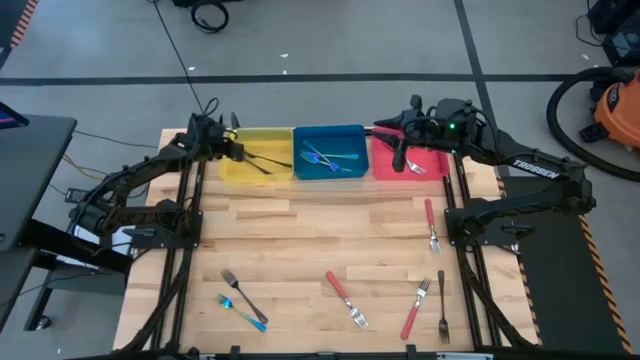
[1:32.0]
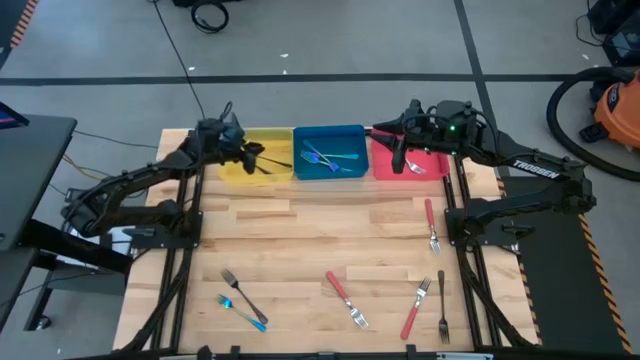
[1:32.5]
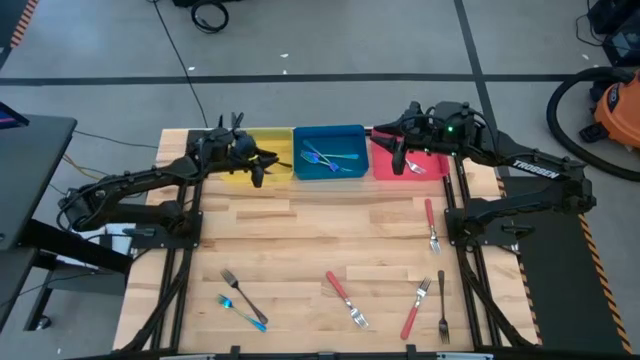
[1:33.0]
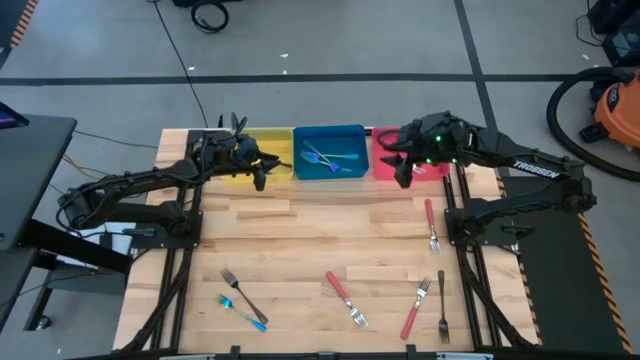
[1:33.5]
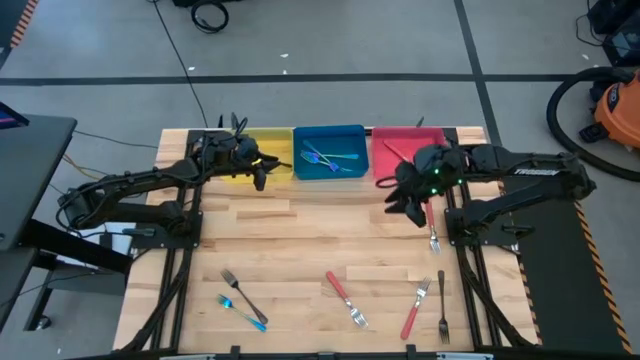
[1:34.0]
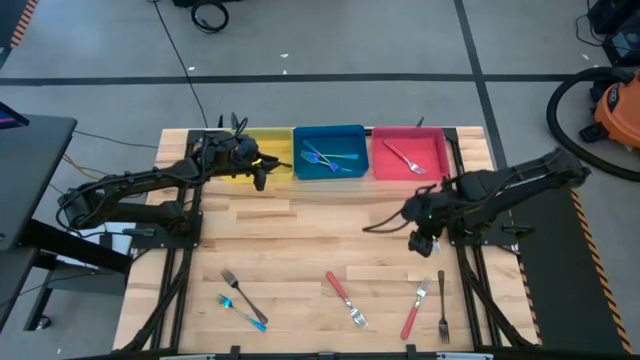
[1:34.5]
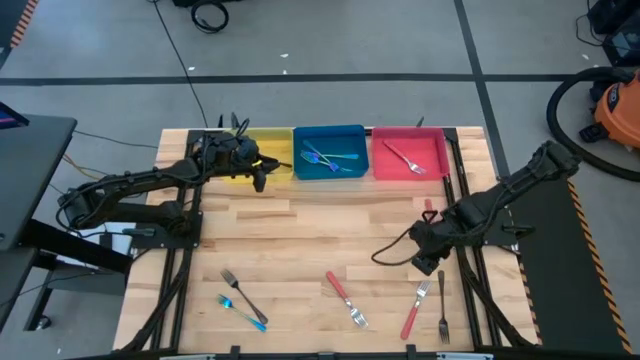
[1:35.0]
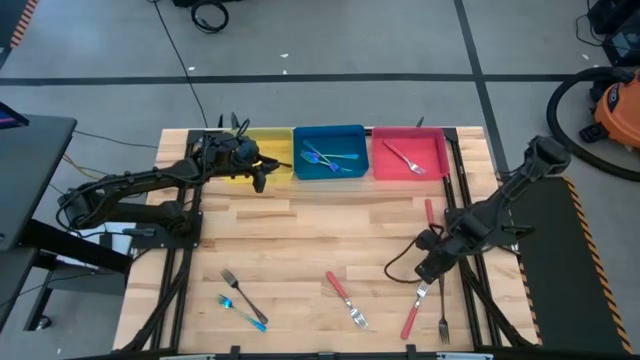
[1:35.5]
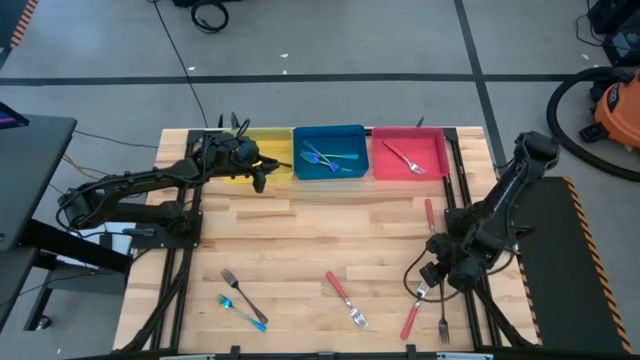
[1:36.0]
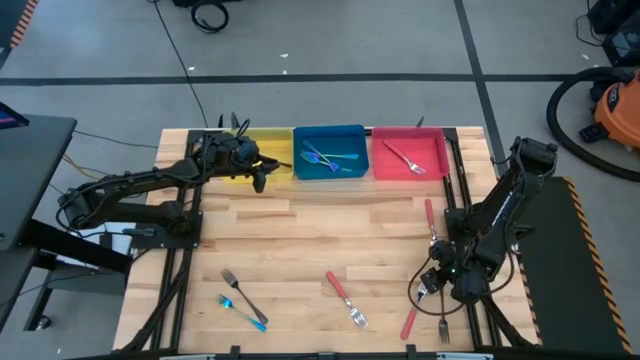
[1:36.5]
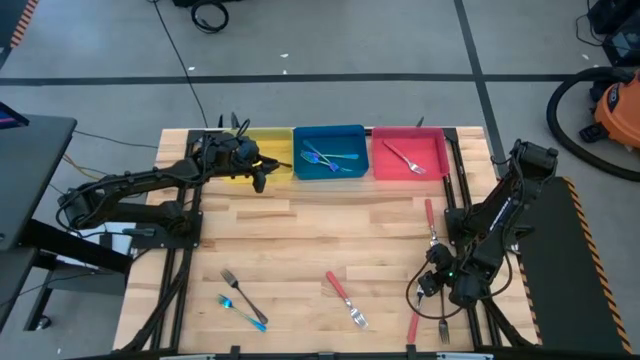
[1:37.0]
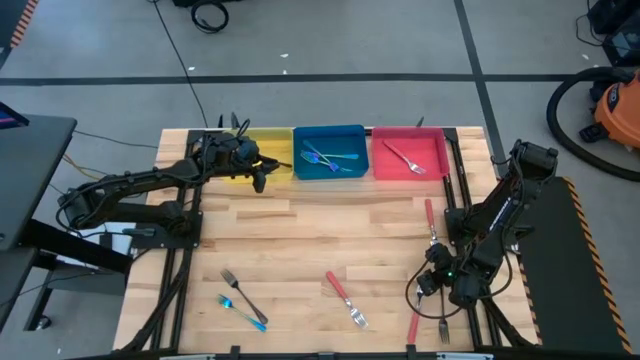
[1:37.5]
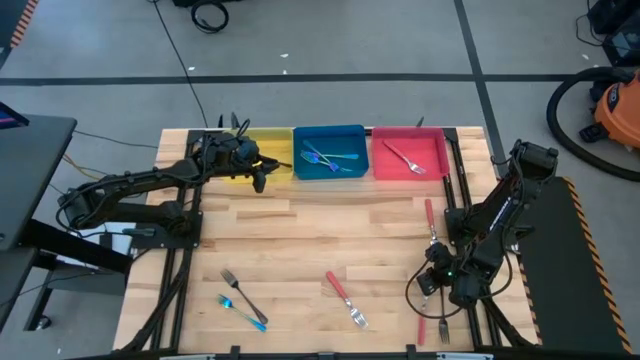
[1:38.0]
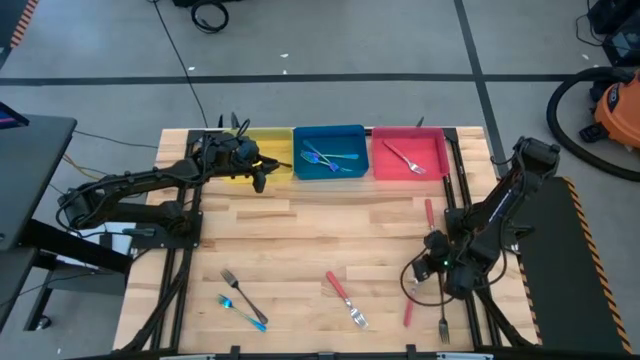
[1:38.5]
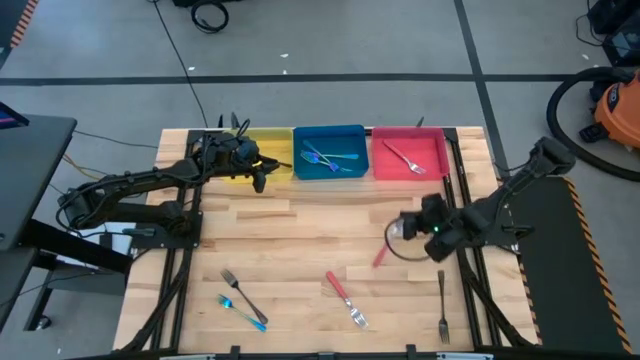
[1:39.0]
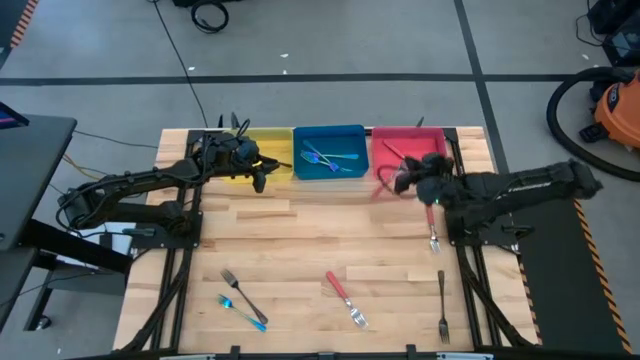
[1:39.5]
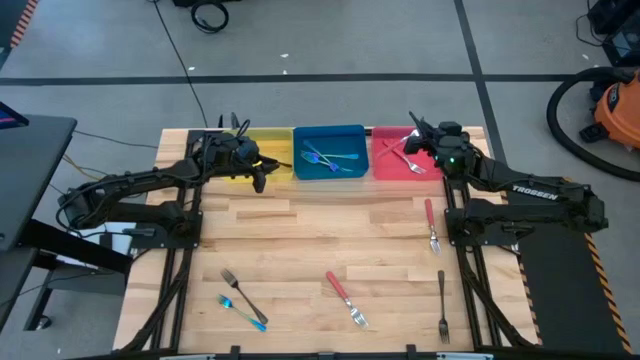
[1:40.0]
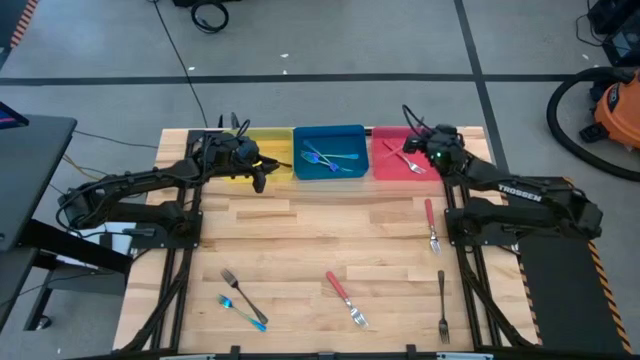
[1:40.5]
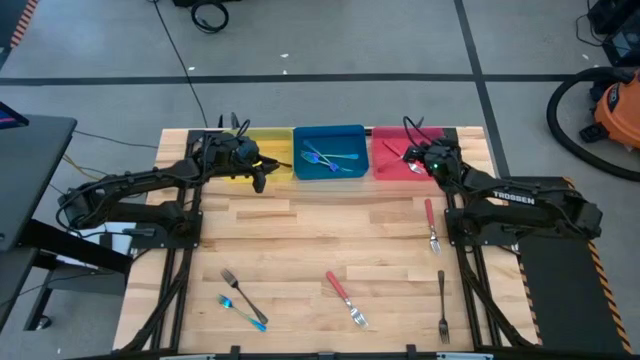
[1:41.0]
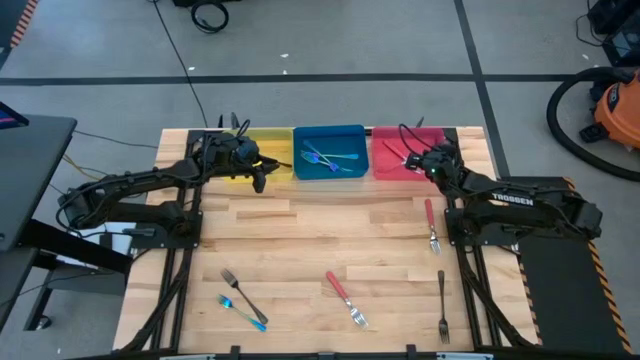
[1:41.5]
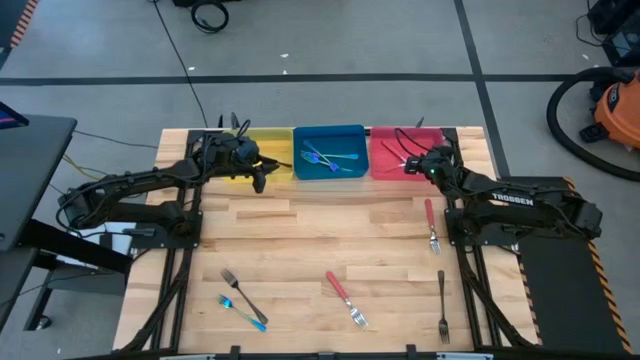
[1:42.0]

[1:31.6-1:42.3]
Task: Sort silverware by color (type)
Put the bottom right pink fork into the red bin

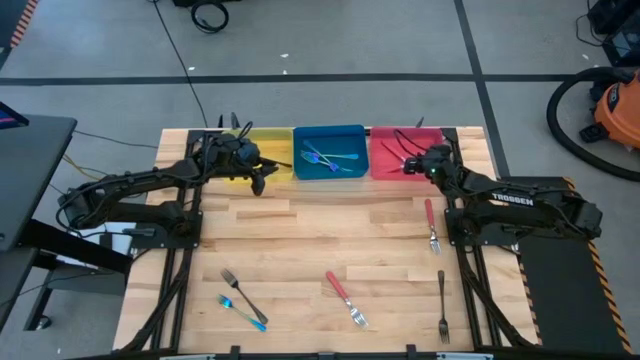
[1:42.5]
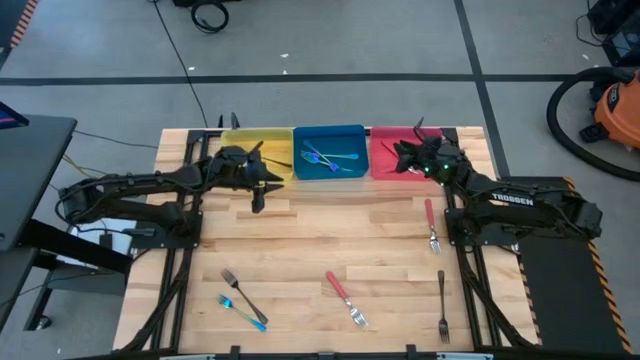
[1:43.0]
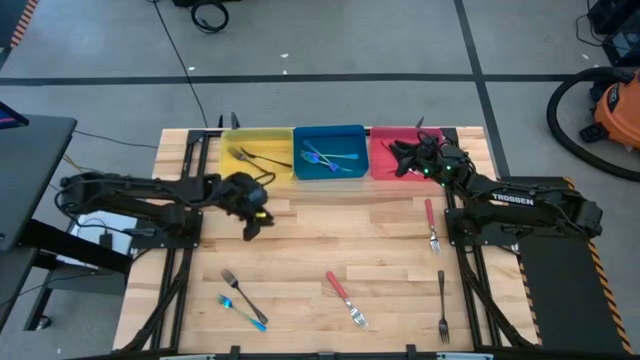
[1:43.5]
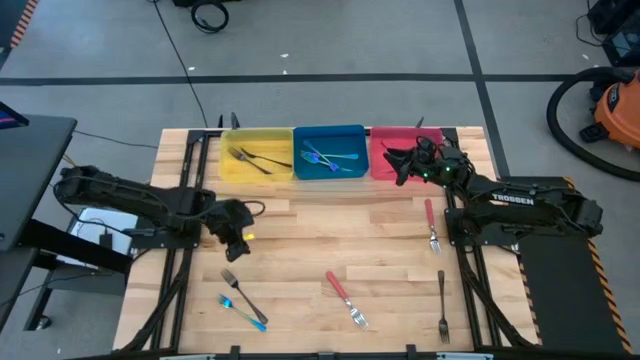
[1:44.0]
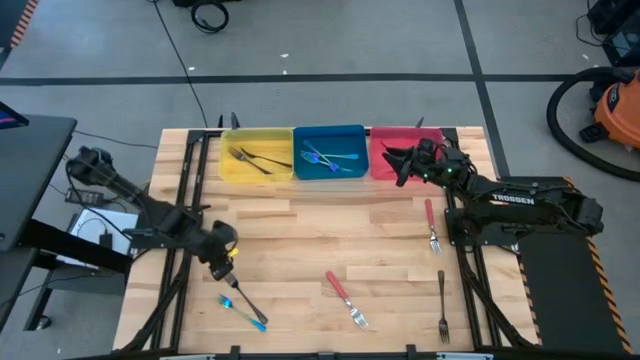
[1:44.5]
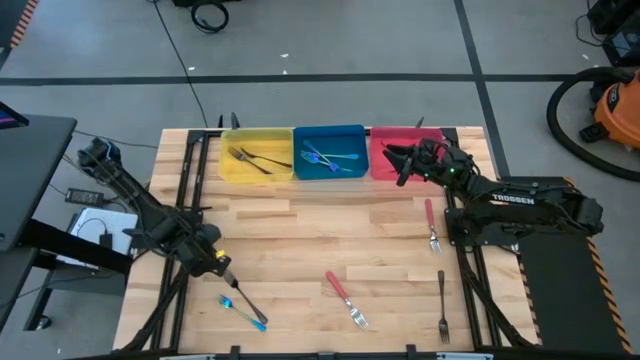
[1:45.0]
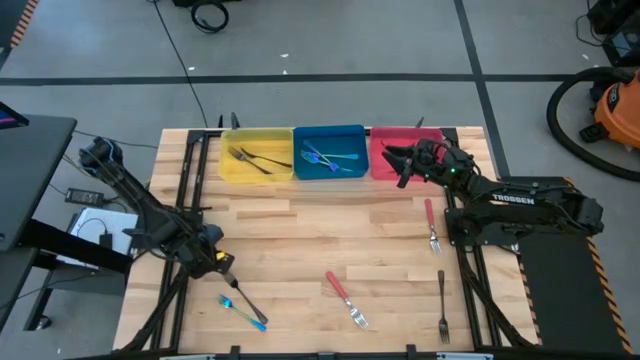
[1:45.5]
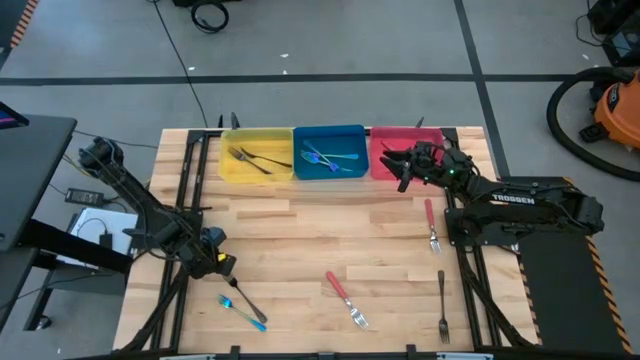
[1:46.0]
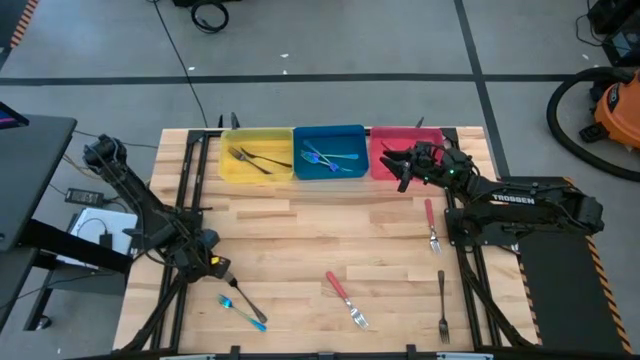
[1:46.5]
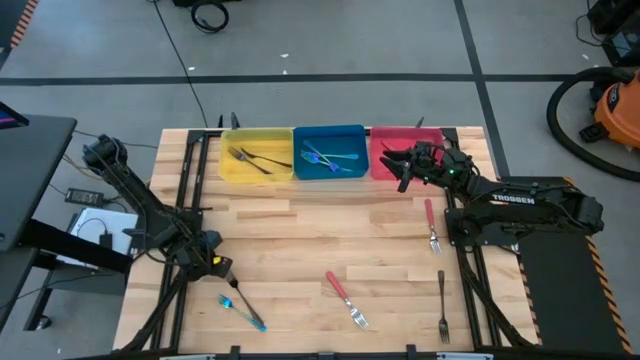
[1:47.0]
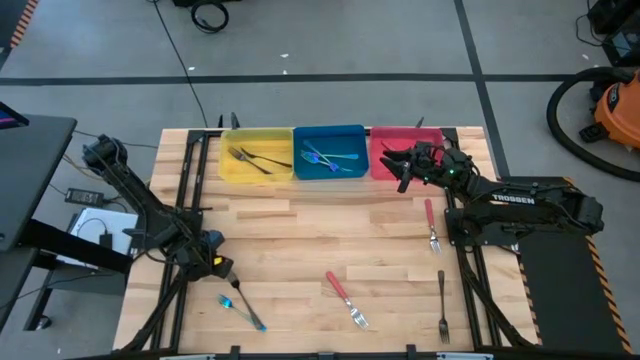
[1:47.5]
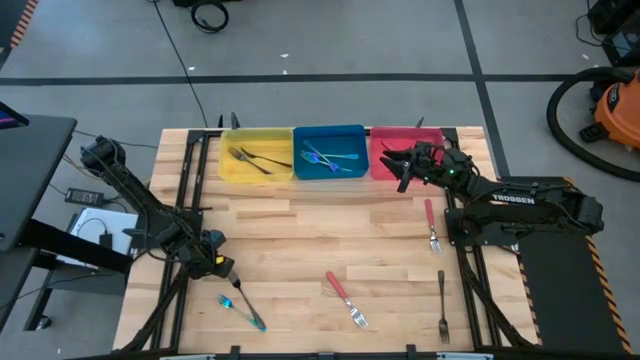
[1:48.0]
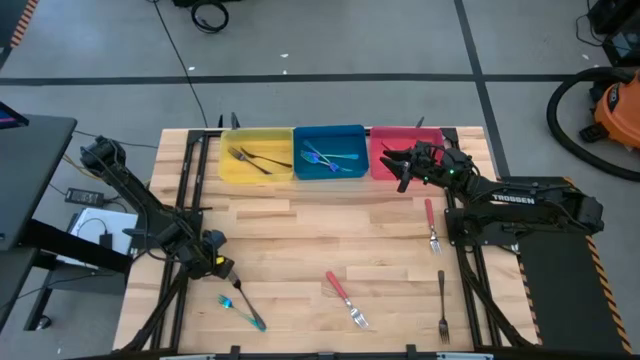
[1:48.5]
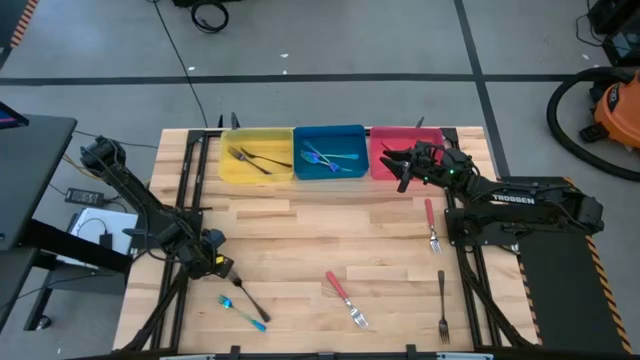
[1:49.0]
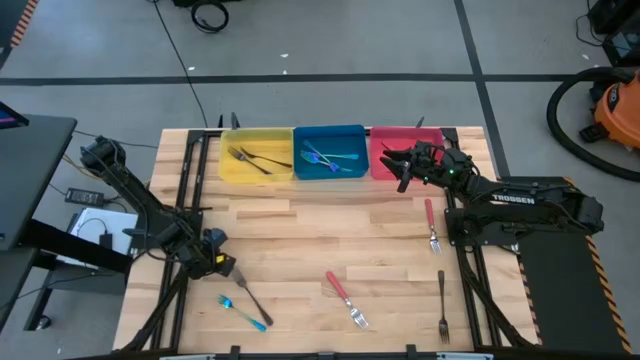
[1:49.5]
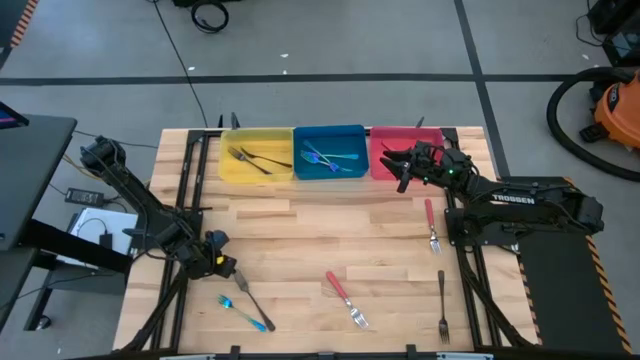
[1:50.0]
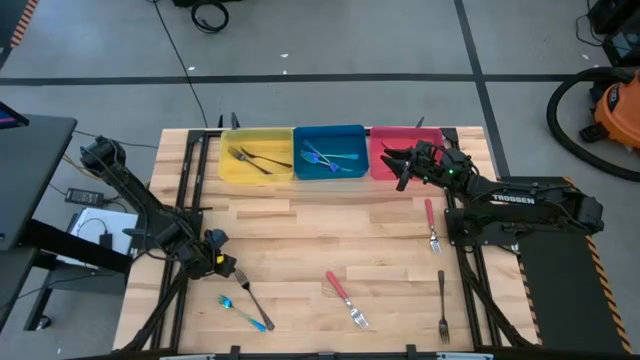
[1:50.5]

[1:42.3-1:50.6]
Put the left black fork into the yellow bin
